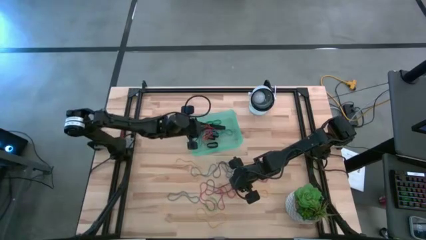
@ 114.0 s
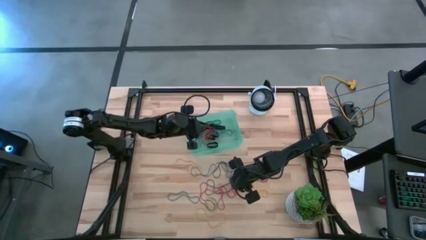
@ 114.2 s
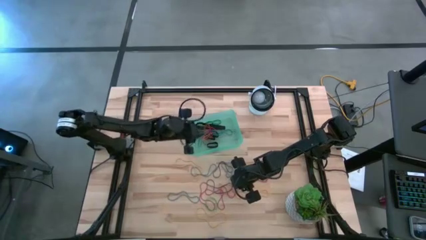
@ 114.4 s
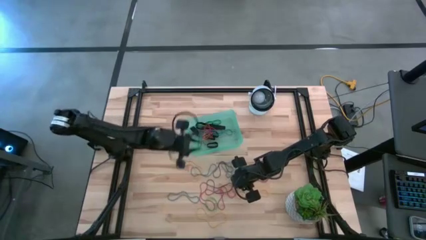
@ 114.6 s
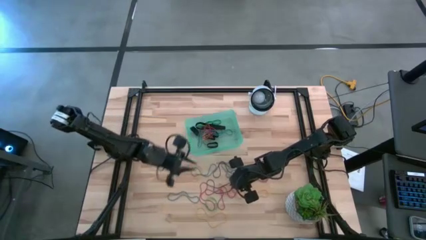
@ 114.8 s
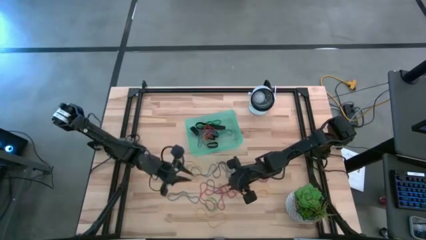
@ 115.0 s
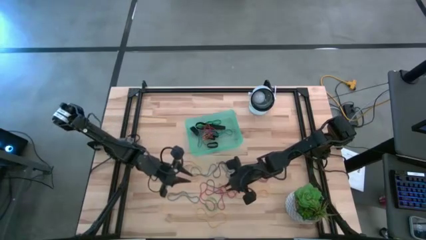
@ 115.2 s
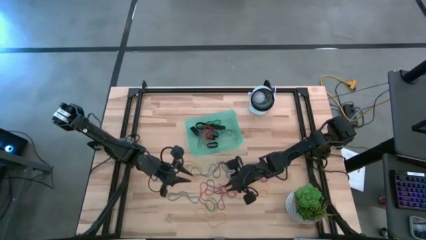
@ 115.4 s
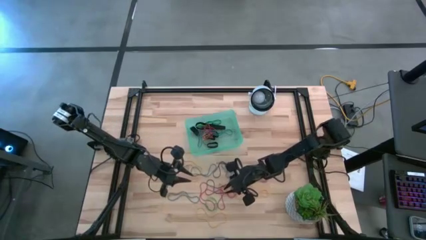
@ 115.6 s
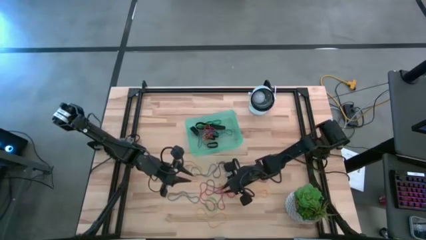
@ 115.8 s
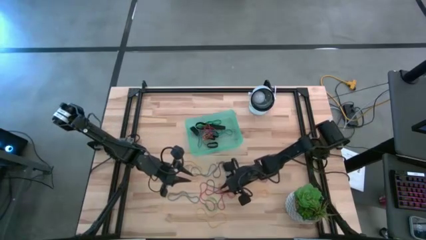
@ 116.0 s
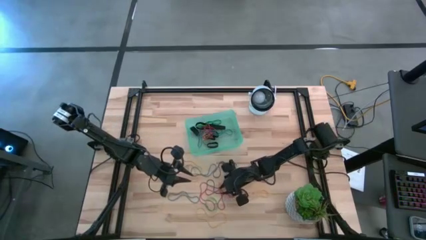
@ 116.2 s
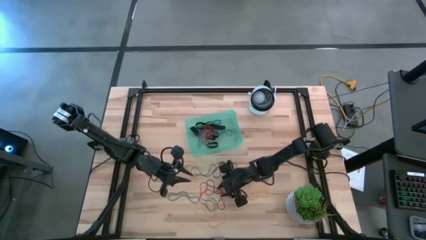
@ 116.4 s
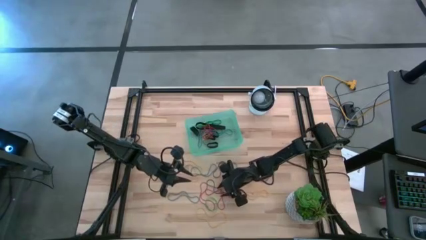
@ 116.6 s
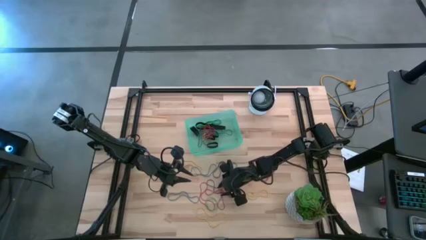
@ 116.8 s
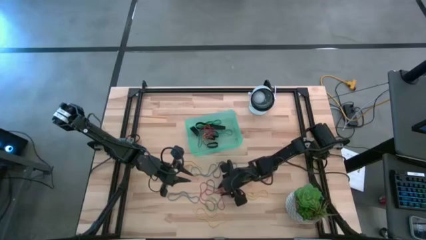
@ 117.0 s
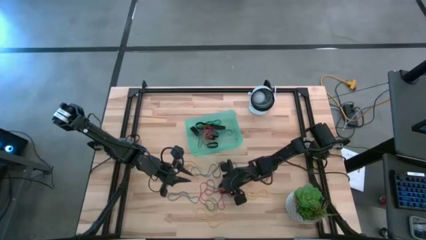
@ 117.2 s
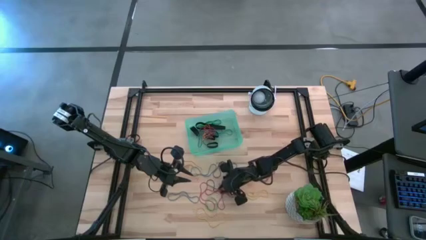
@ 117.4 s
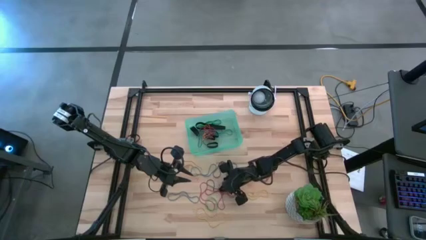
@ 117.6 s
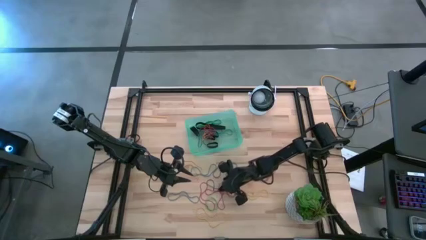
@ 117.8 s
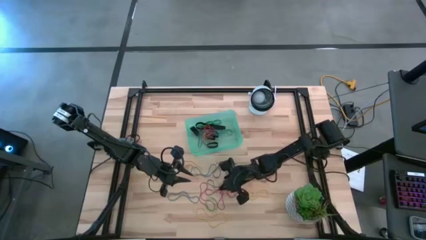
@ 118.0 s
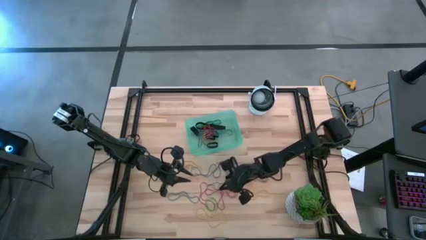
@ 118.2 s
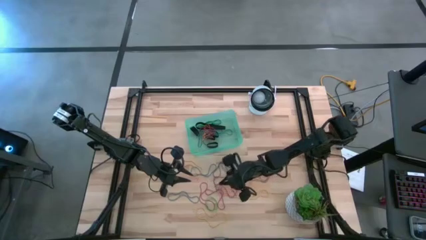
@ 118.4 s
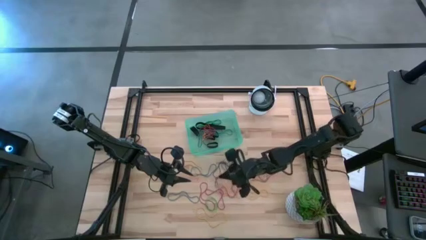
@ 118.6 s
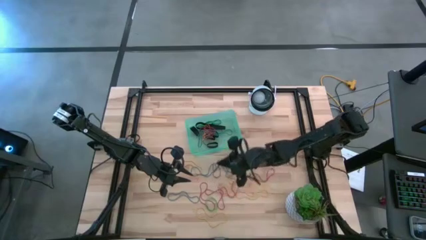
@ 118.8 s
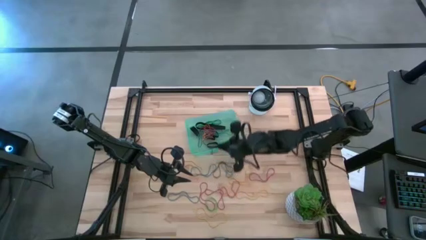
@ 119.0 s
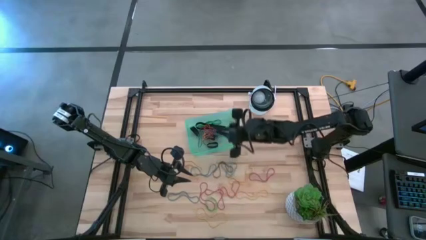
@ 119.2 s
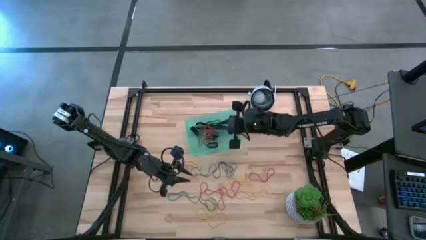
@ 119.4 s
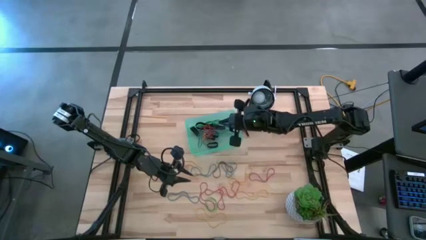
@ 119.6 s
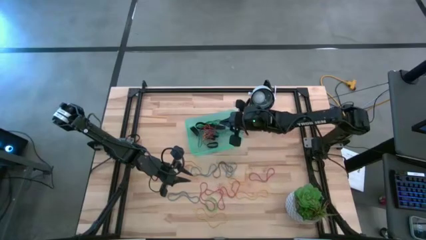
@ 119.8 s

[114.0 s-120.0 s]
Task: Pick and place rubber bands into bin
Put the violet rubber band into the green bin

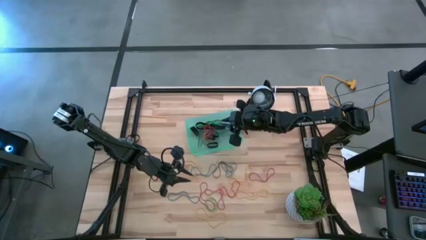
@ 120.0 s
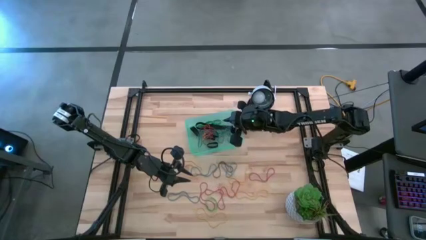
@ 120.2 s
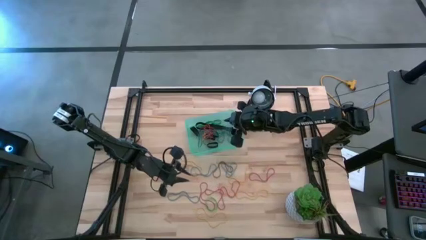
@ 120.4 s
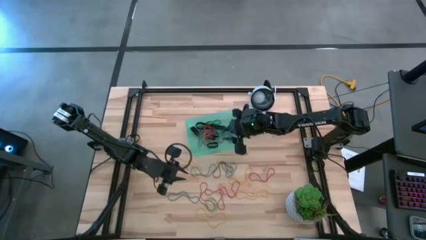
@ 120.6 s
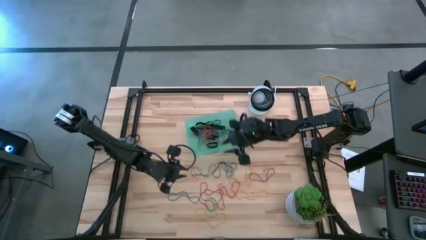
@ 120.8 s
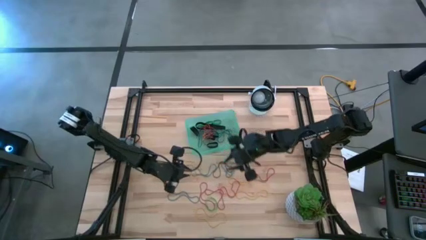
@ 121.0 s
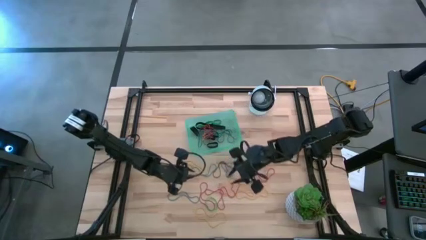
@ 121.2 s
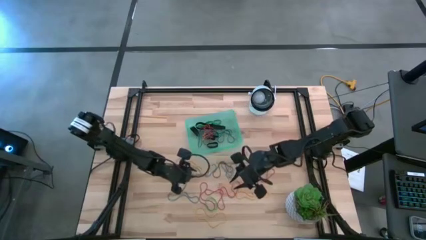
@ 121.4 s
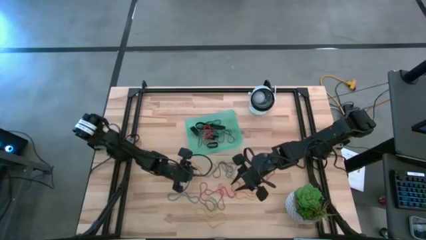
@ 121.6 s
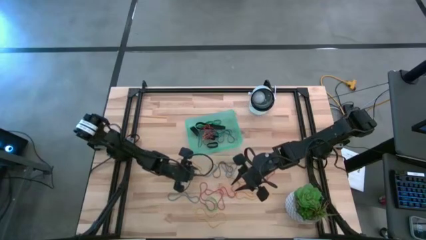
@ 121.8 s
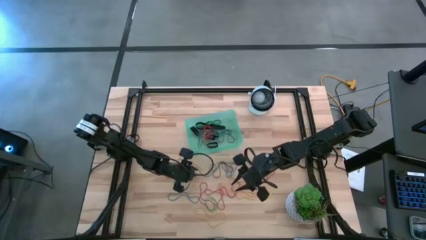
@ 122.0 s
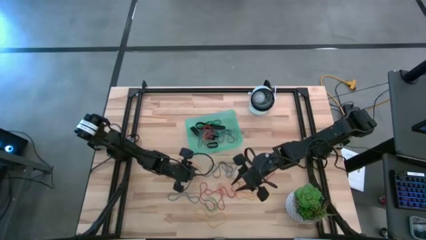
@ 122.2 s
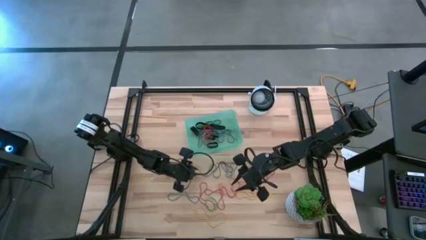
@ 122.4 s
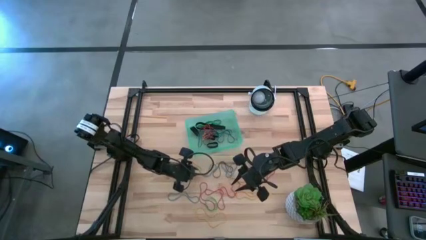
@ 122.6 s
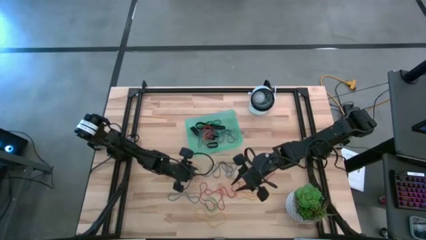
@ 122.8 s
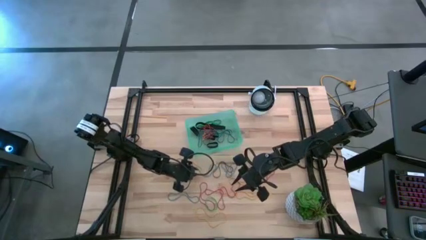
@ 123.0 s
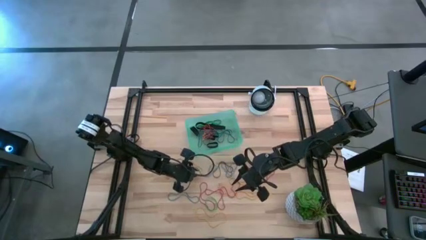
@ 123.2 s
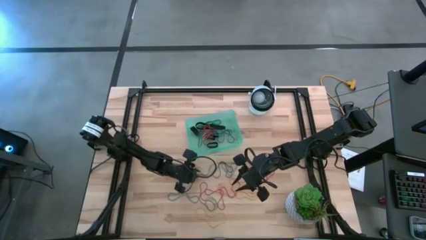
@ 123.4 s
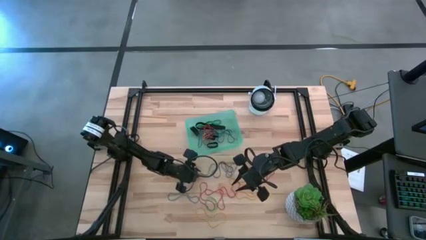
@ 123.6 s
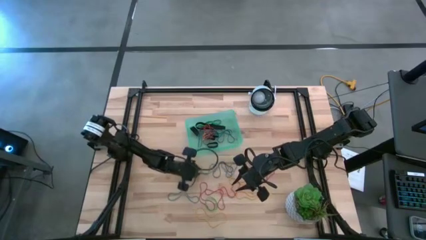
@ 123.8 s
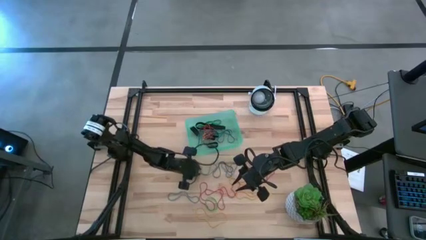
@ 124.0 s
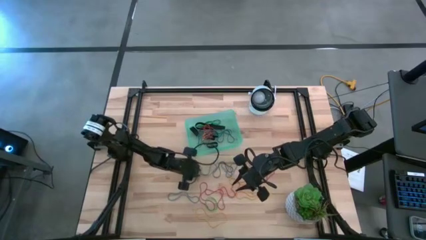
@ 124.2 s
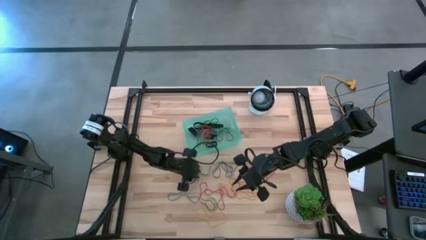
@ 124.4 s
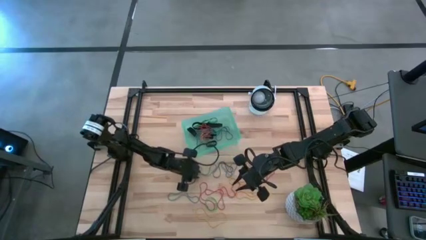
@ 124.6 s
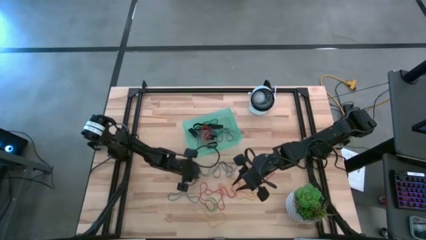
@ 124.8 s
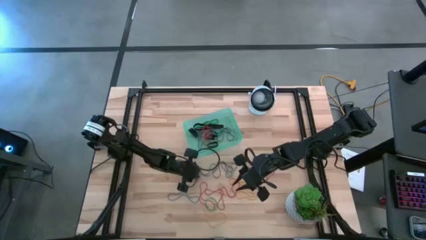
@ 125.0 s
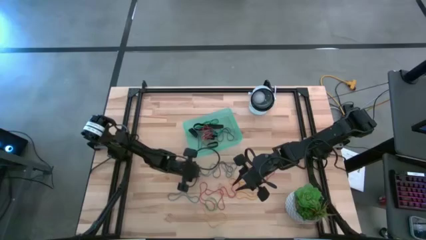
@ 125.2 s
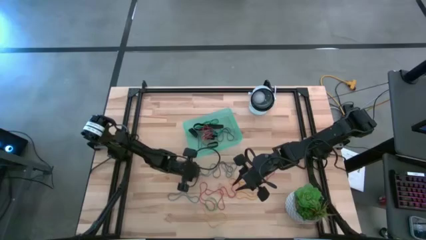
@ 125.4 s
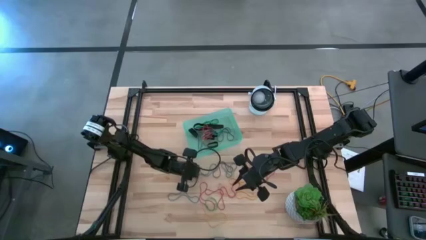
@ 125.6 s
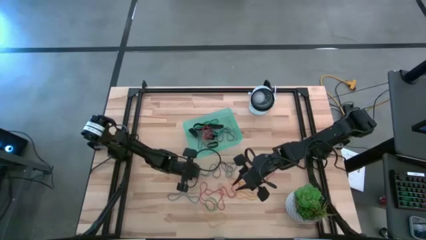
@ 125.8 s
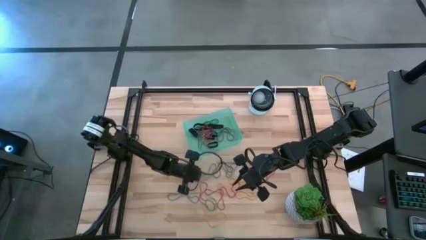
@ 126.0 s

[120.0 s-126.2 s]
Put the yellow rubber band into the green bin

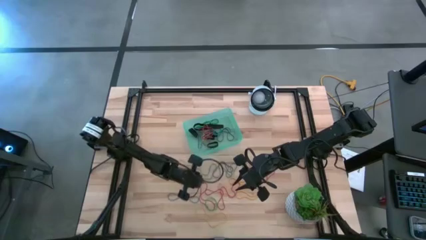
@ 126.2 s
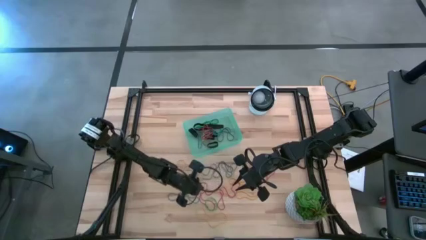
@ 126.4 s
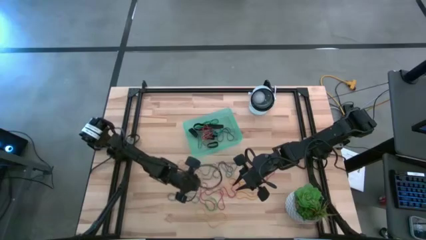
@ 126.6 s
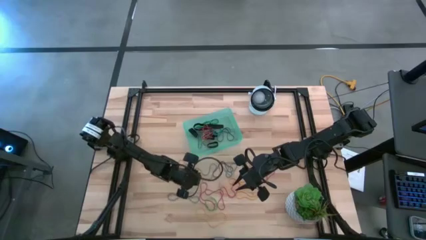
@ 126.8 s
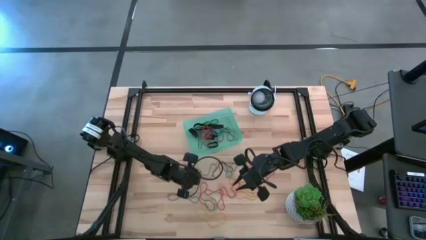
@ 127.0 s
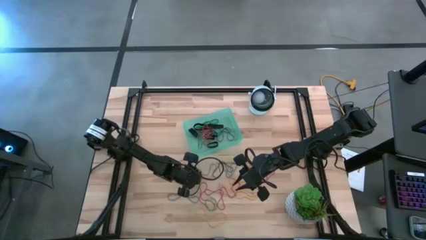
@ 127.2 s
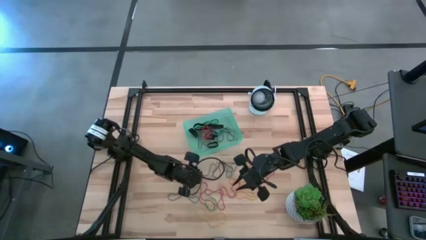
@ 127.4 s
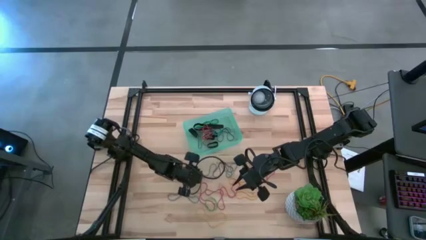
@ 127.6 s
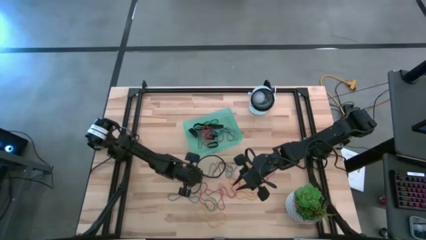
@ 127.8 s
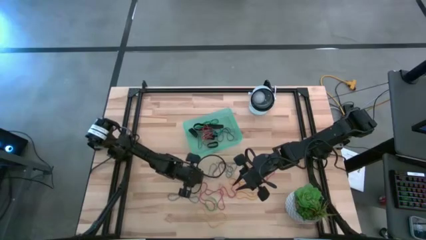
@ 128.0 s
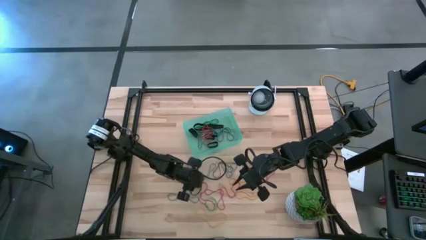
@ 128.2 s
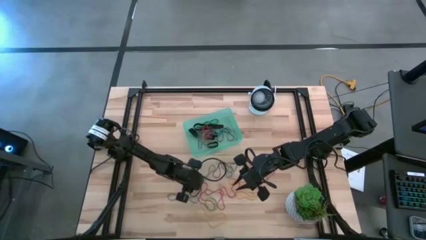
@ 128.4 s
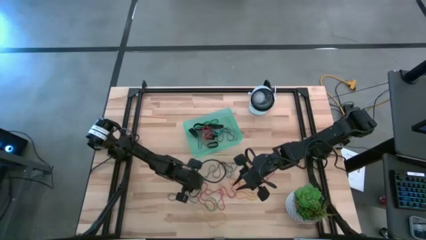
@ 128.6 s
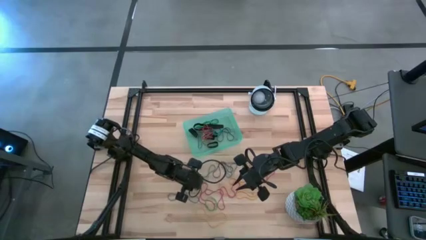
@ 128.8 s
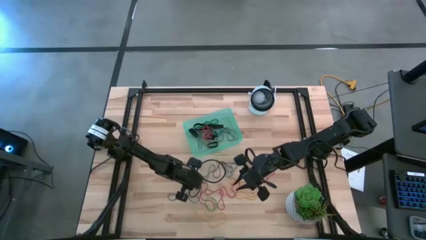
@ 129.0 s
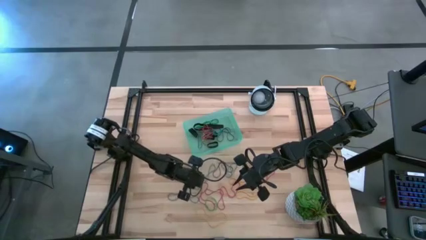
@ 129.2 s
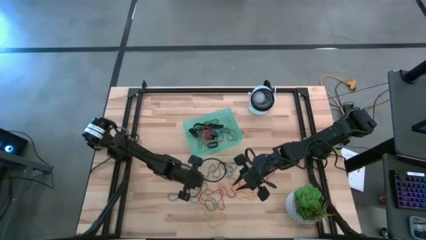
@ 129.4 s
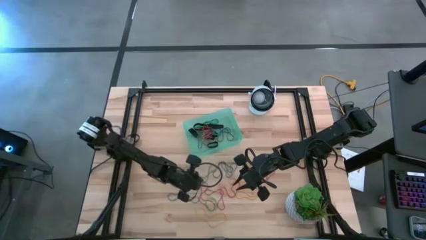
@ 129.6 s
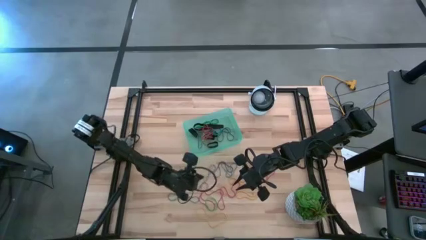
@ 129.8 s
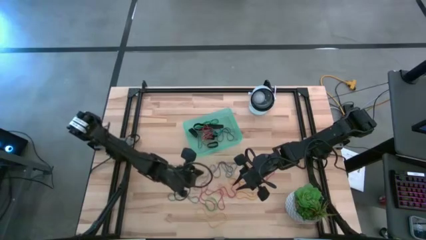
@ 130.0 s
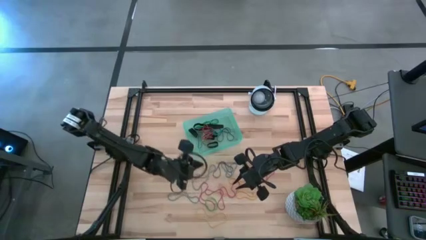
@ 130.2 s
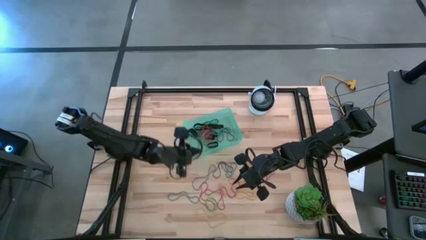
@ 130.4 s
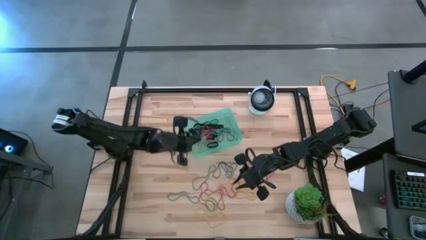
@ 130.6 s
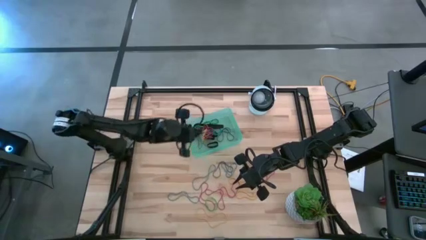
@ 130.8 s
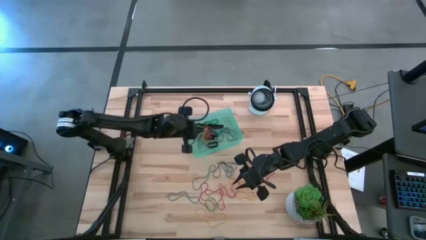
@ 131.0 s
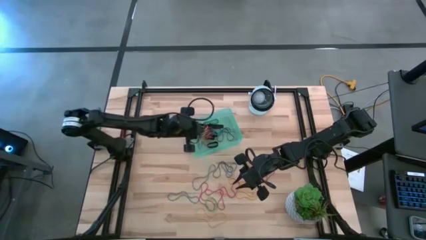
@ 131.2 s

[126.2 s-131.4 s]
Put the yellow rubber band into the green bin
